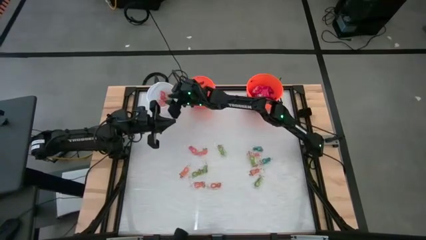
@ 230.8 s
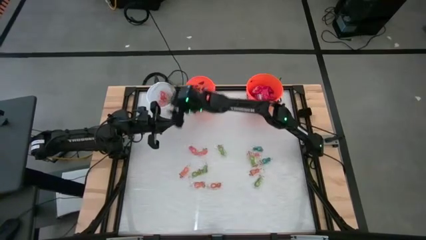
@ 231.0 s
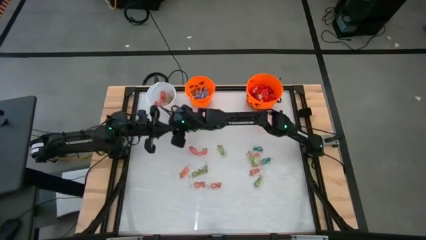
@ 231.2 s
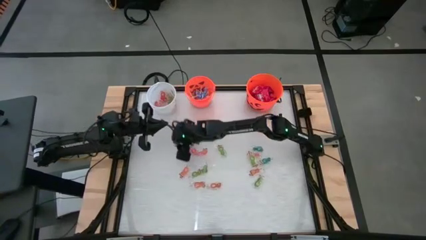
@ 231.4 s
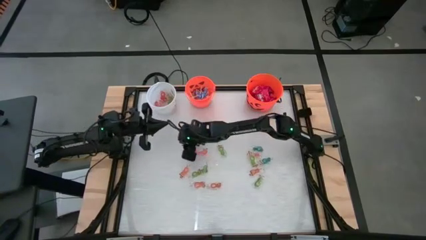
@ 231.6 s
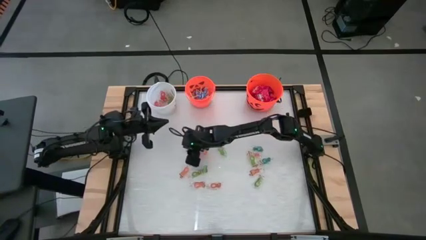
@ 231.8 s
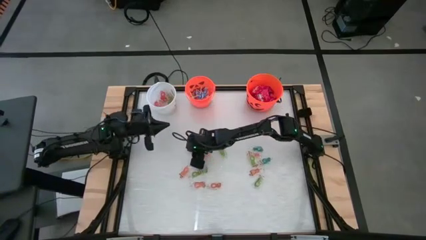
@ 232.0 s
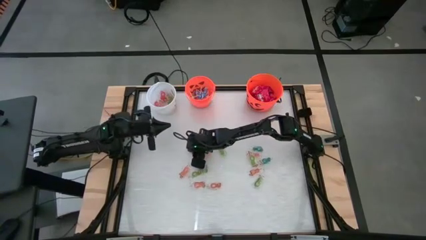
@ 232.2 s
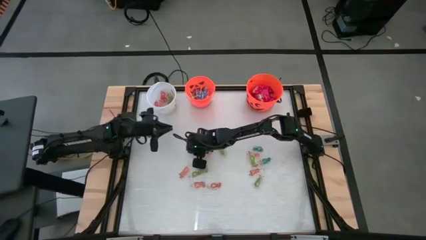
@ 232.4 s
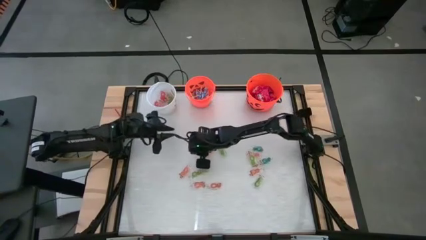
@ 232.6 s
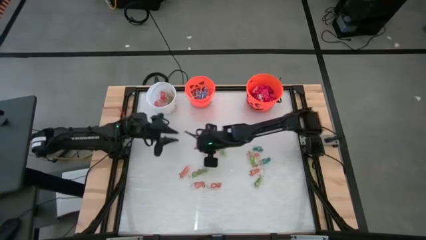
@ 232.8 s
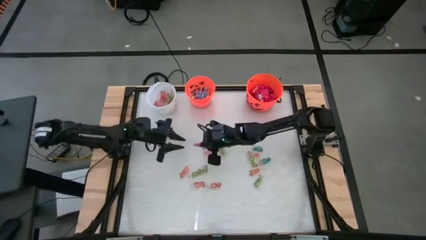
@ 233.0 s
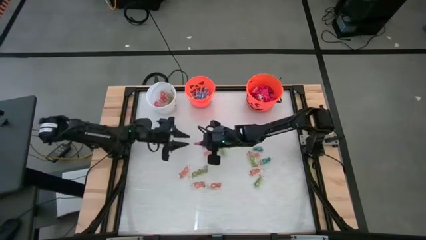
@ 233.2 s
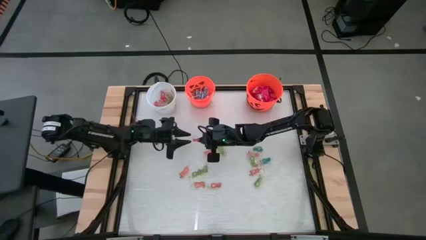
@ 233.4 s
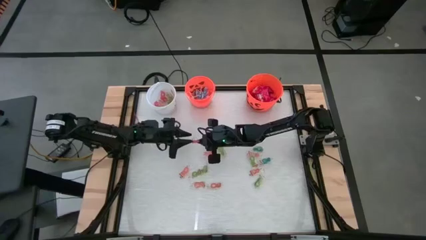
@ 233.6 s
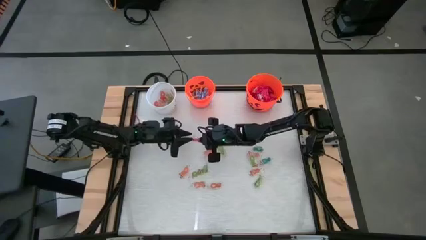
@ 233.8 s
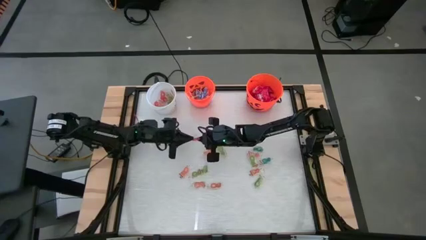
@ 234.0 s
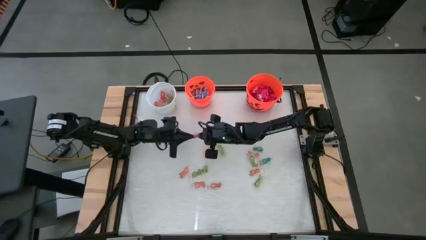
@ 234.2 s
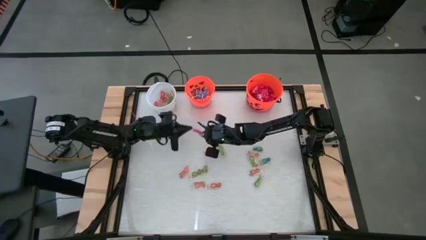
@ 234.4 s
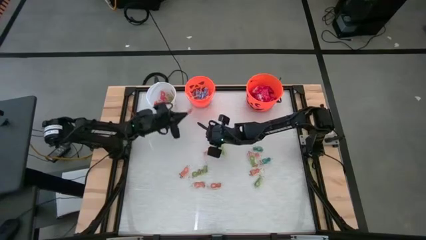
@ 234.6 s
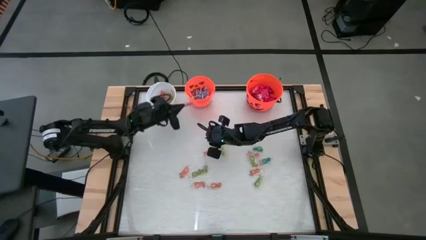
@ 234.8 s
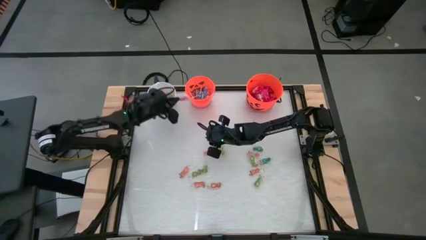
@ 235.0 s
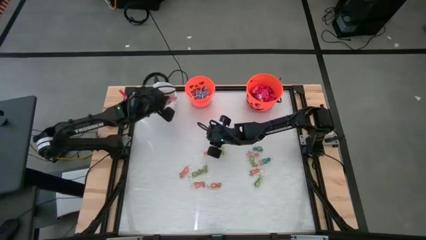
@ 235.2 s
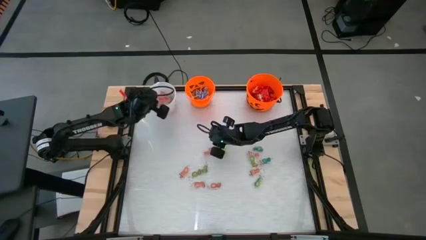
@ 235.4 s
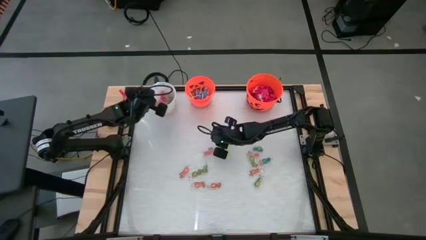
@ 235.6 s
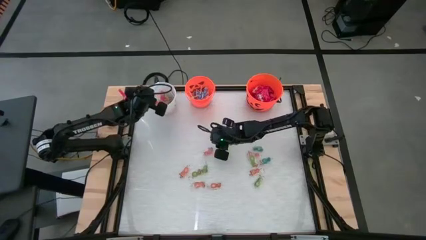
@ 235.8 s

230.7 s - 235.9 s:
Task: Sort candy by brand, put in halloween buckets
Put the orange gummy into the white bucket

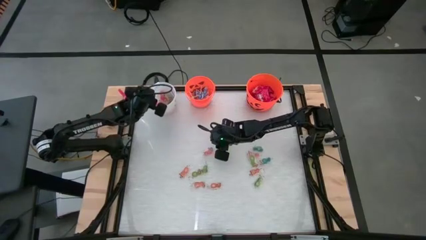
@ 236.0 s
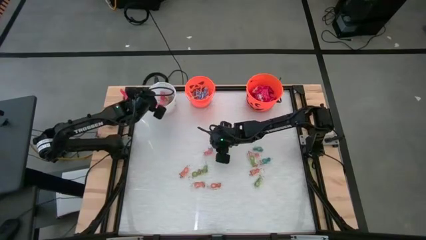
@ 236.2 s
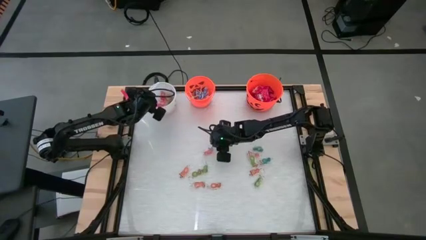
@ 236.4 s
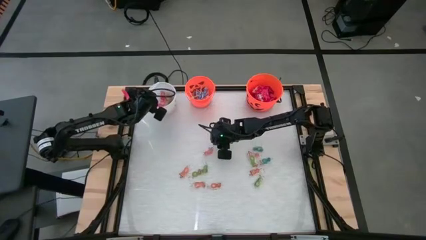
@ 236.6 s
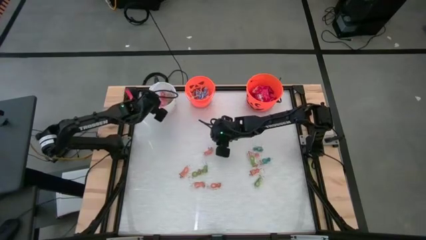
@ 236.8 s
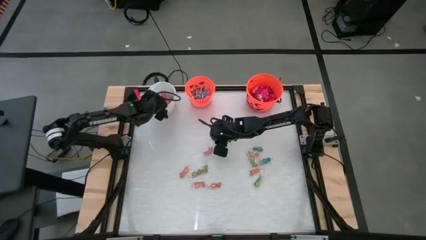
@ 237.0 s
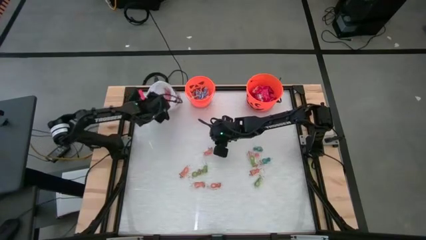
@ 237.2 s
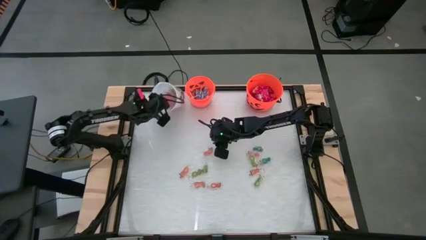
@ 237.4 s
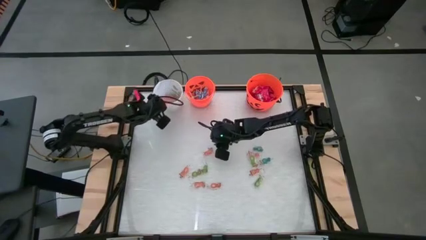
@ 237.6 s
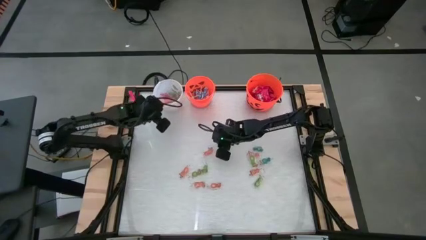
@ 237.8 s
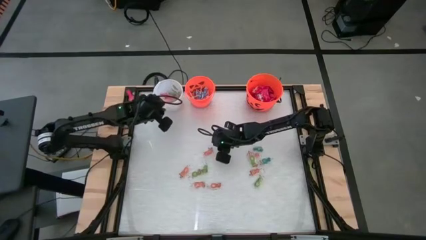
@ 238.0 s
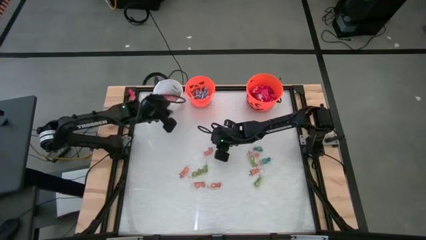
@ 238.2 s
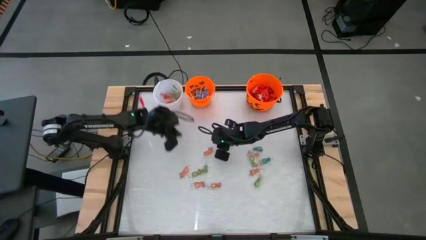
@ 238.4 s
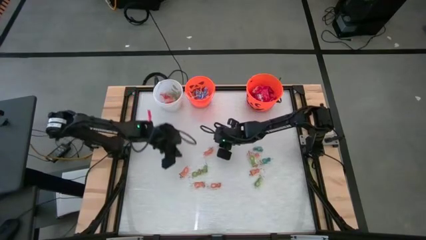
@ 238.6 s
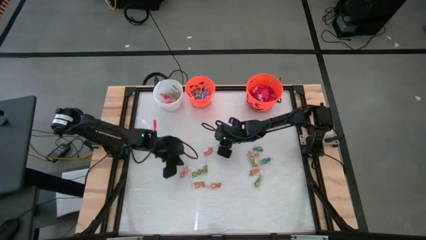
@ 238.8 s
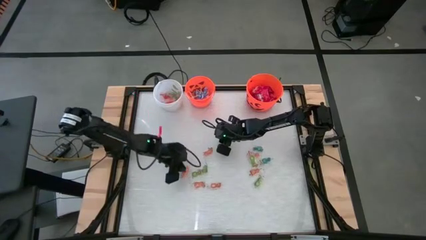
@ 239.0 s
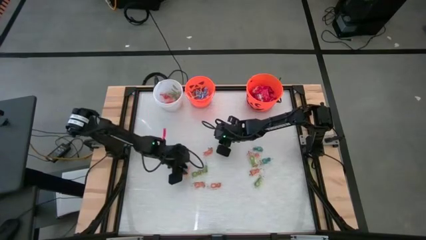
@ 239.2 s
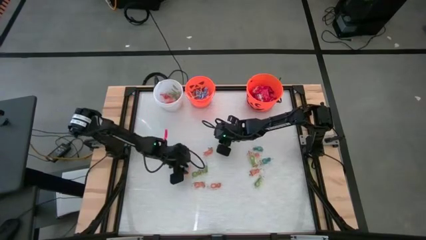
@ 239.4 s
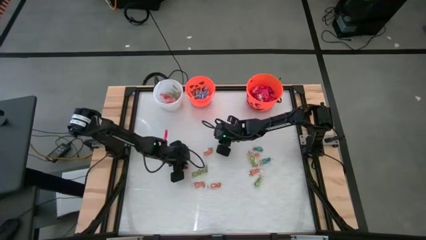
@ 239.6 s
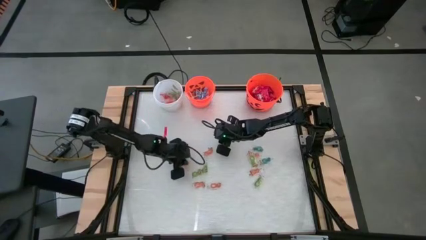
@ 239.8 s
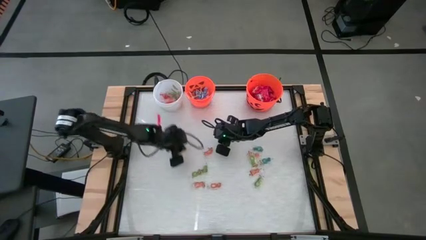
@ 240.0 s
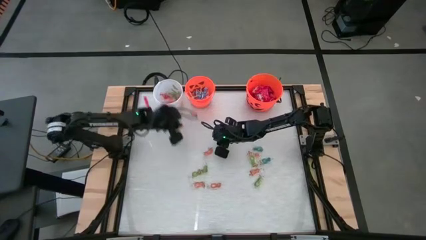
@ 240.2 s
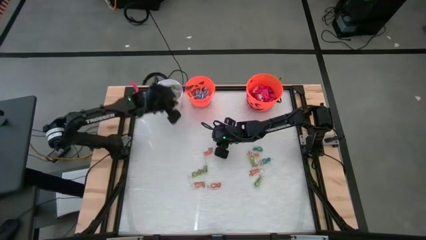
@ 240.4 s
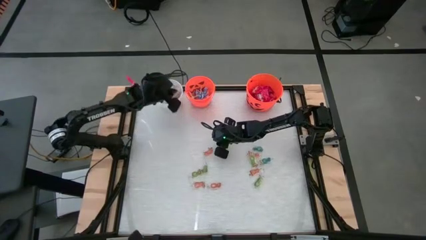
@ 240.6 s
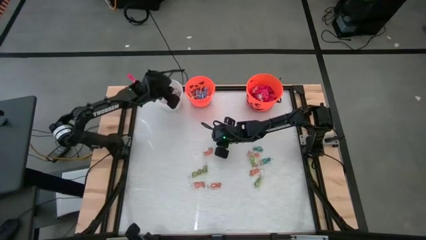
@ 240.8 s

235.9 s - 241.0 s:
Put the orange gummy into the white bucket

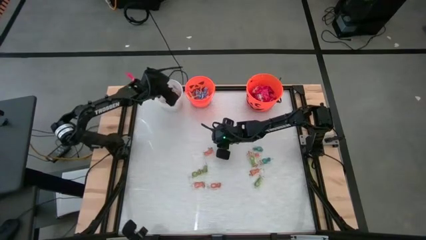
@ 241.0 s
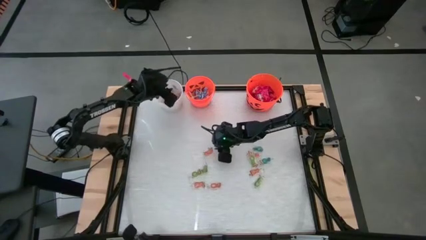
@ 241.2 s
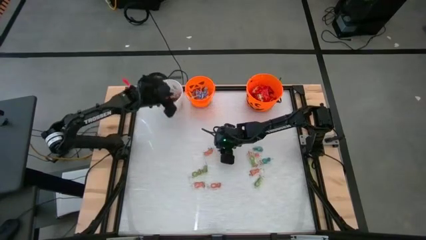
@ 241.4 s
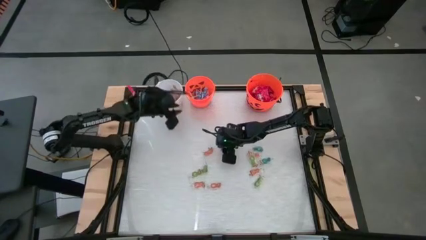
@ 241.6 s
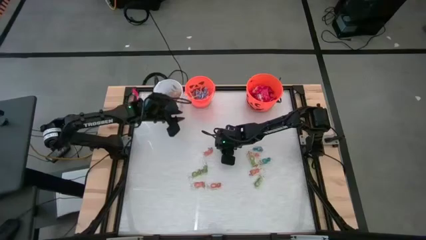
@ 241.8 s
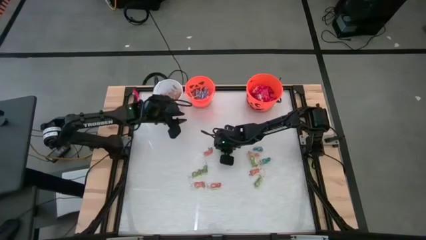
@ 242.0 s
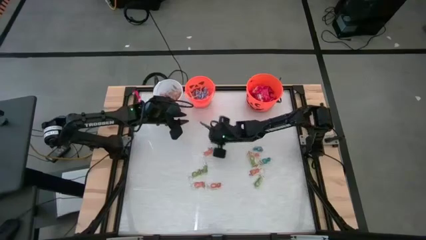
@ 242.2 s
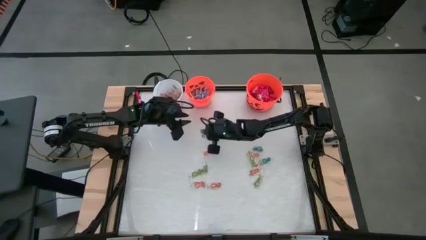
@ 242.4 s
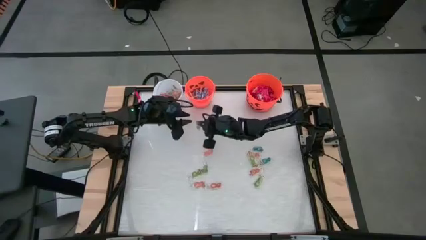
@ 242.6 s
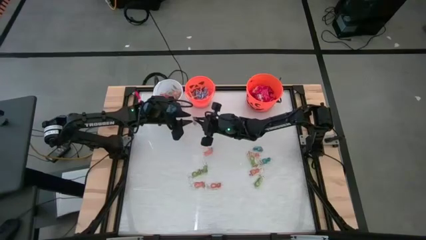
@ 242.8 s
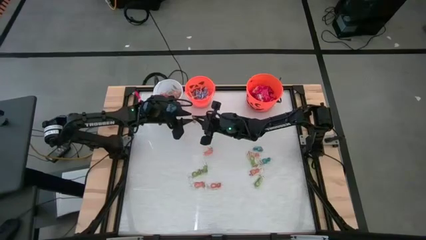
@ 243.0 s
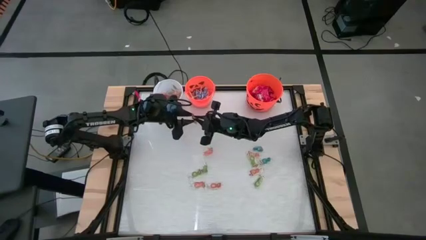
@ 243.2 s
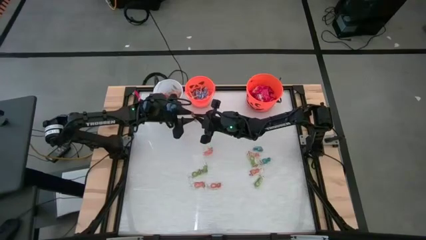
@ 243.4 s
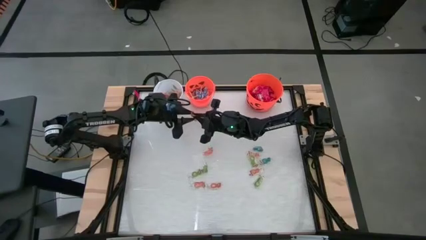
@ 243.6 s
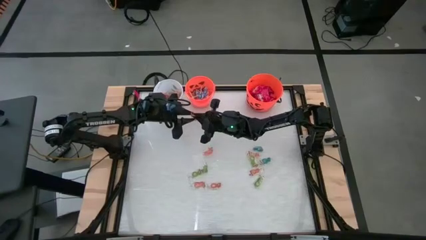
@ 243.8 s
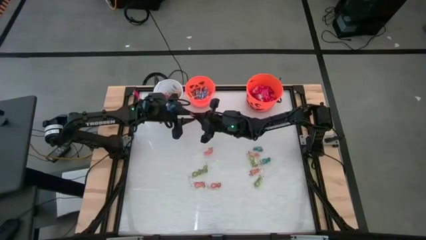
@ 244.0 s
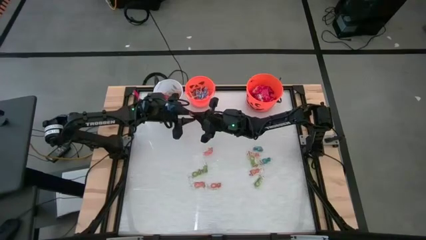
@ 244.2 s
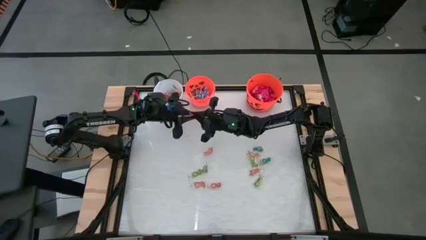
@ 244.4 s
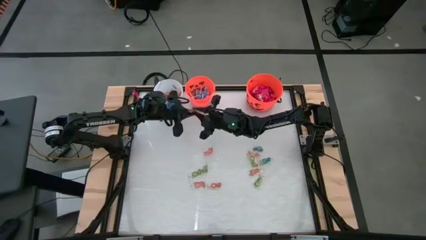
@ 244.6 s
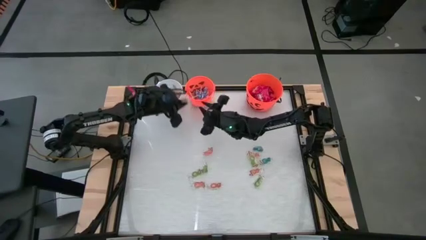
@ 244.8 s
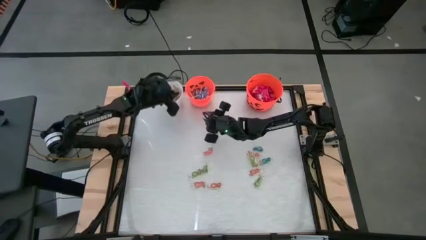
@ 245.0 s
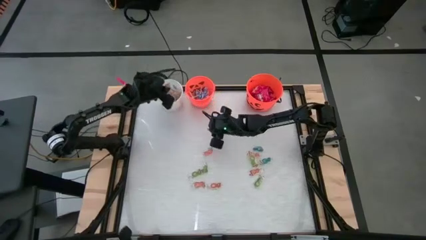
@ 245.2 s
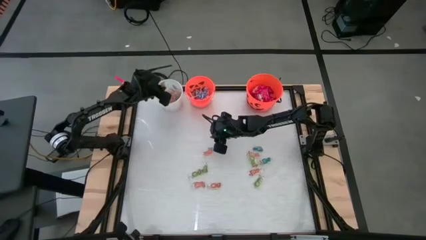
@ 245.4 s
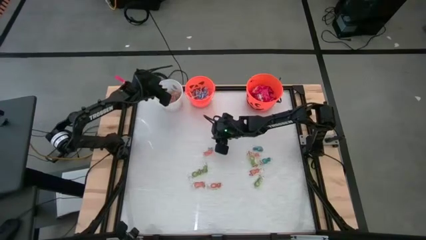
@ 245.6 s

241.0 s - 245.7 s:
Put the green gummy into the white bucket

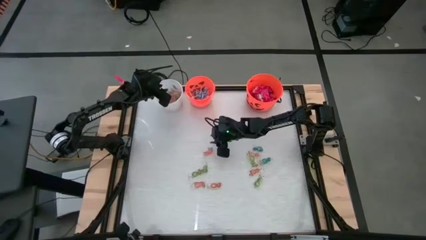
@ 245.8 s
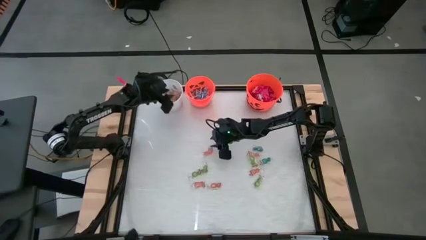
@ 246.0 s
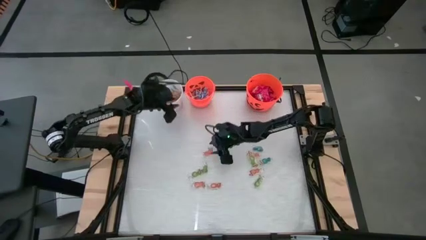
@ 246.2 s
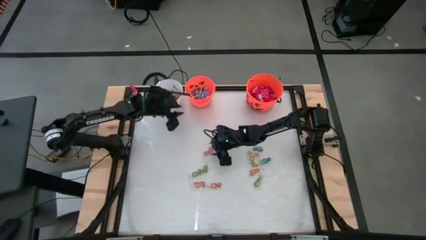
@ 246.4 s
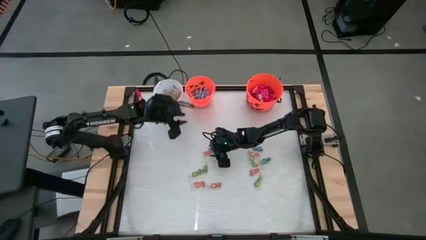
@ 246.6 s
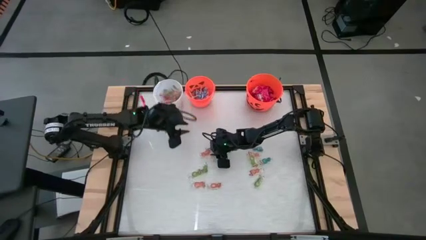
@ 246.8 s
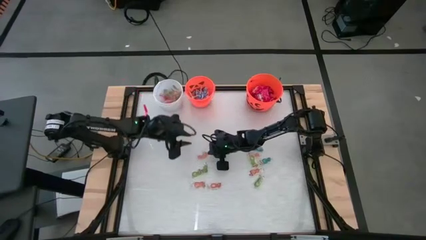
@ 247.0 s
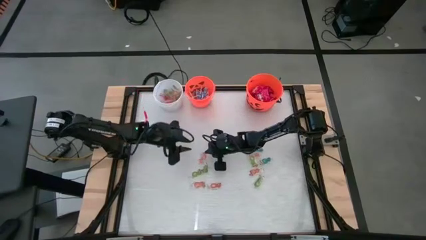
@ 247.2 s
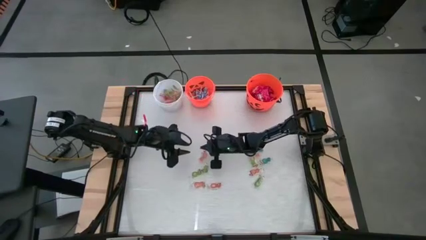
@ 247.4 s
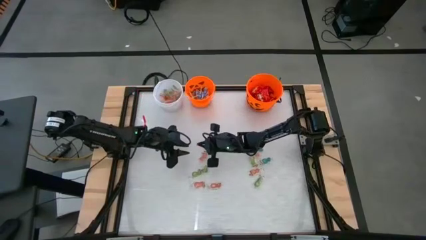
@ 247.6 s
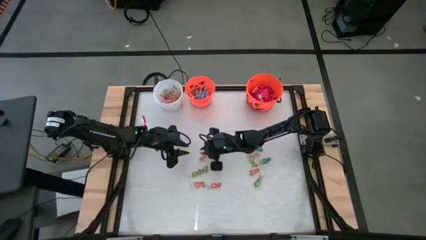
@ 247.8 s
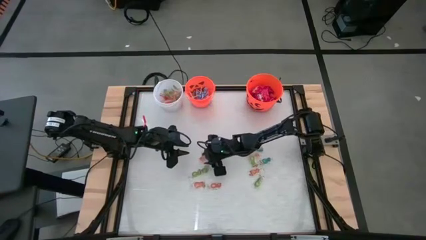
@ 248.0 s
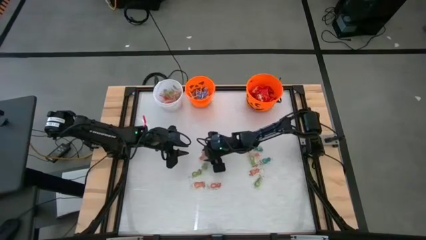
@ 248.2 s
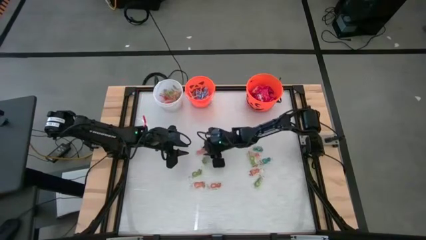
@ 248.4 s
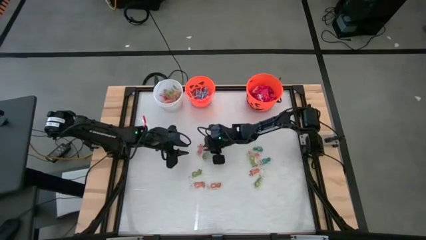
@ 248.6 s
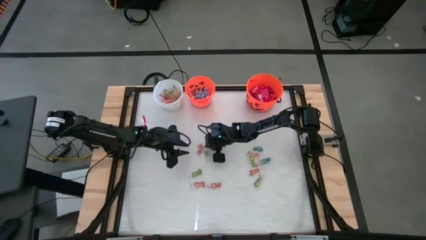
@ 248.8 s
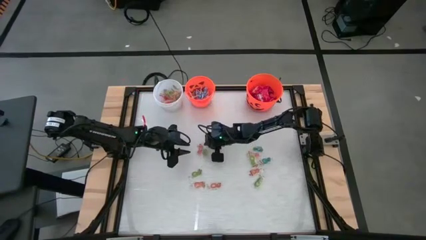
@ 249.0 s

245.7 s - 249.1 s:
Put the blue gummy into the white bucket
